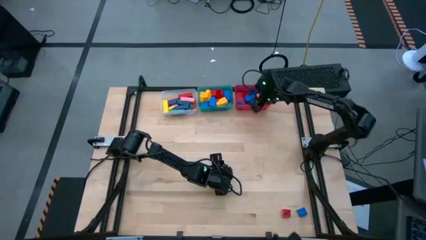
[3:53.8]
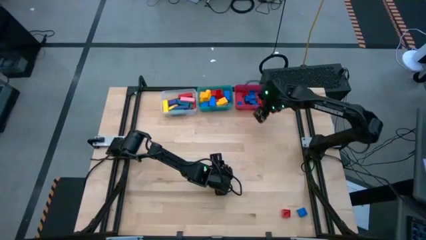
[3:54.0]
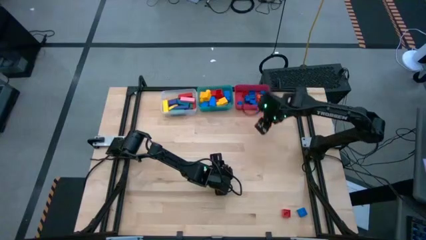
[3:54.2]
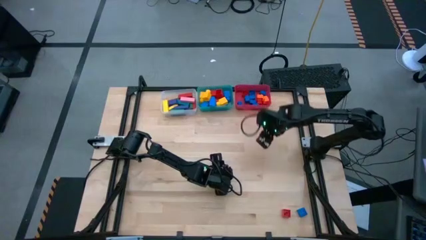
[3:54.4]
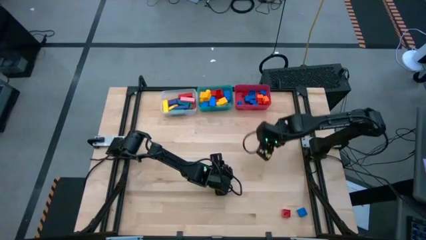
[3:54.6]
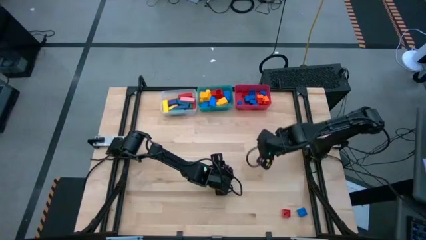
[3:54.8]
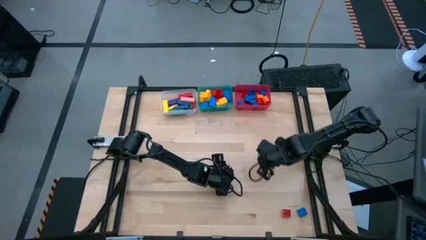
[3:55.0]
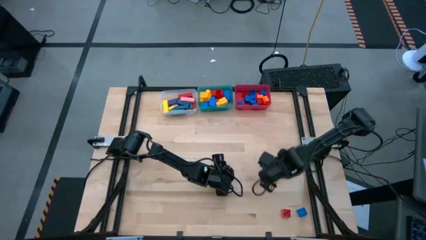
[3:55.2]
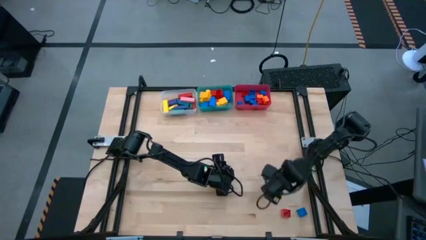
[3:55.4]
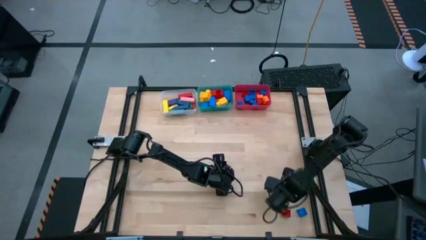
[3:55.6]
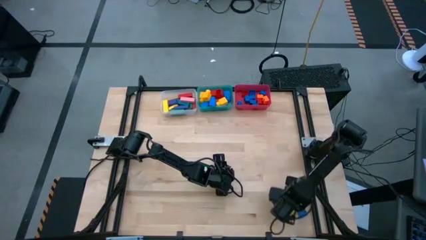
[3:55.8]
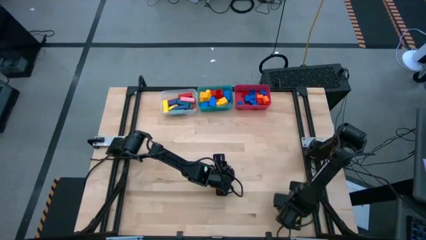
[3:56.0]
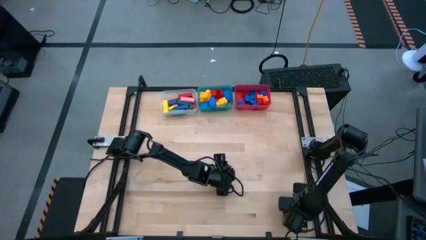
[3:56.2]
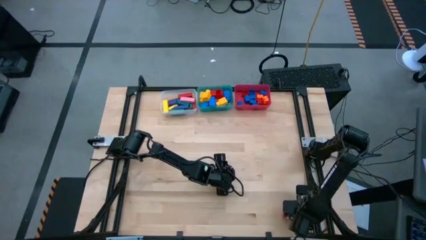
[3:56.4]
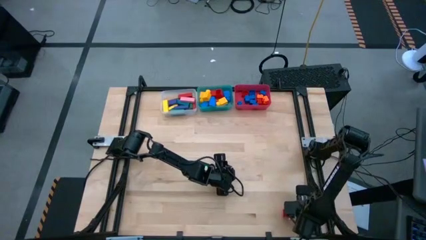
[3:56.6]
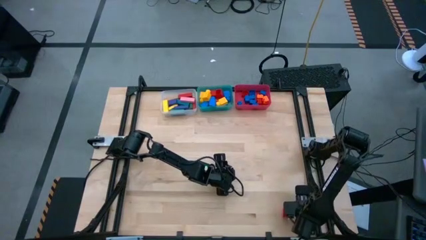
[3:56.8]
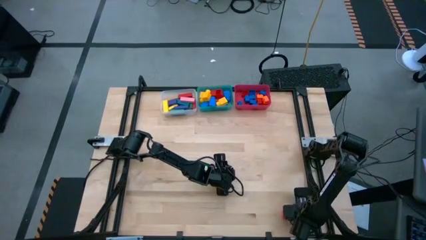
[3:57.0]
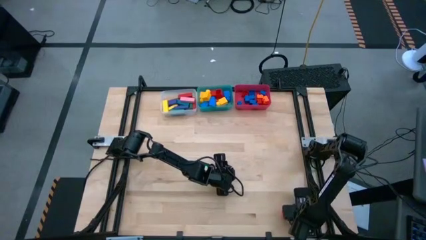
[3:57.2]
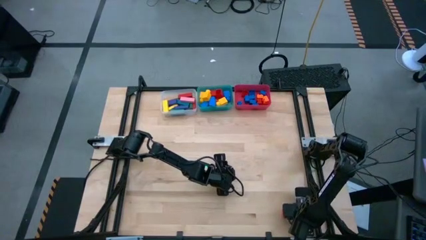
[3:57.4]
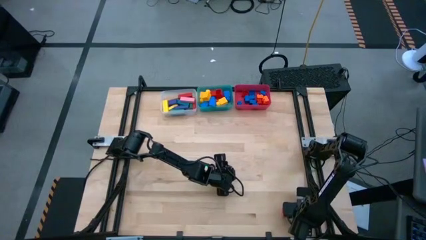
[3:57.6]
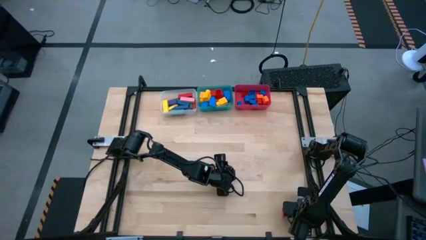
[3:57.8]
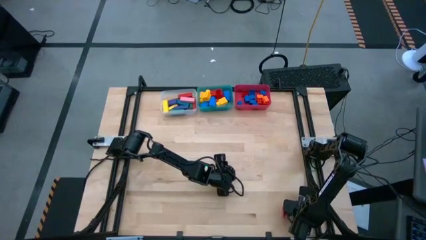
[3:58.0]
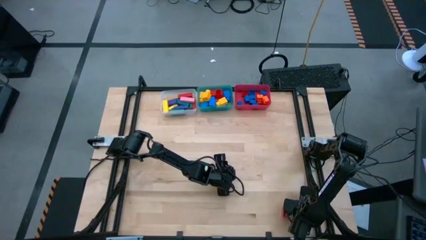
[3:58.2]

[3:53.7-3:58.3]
Task: Sort blocks by size
Put the small blue game piece into the red bin

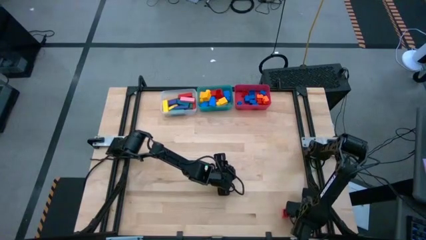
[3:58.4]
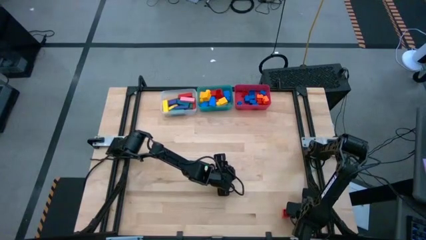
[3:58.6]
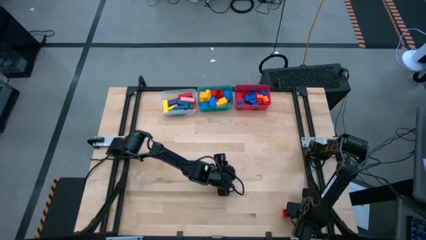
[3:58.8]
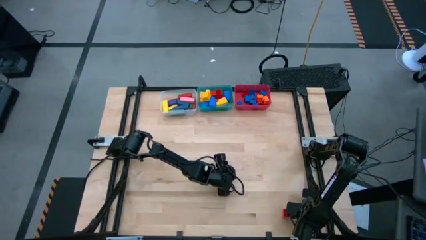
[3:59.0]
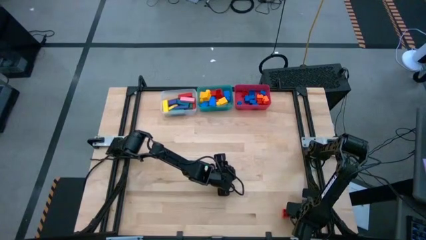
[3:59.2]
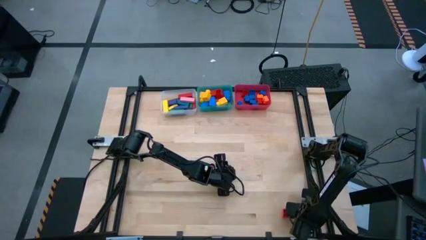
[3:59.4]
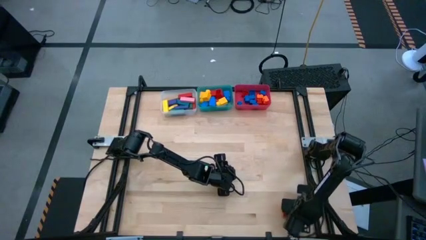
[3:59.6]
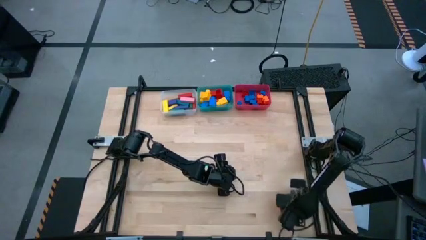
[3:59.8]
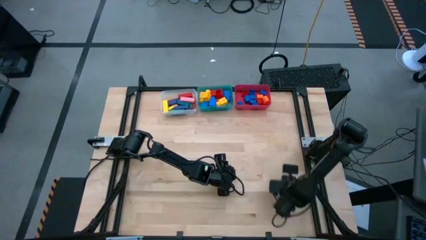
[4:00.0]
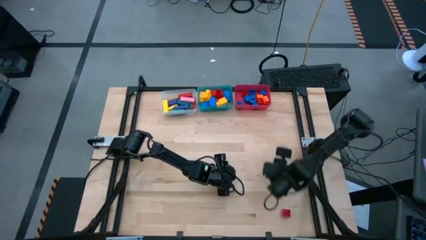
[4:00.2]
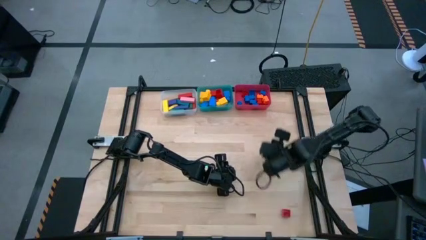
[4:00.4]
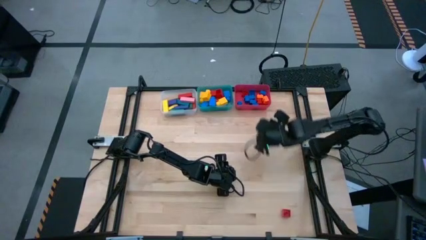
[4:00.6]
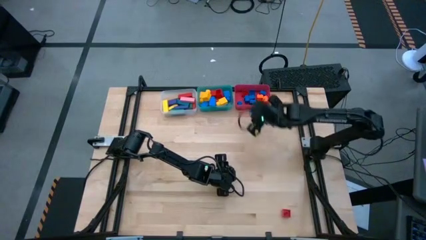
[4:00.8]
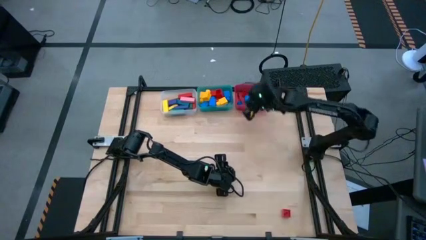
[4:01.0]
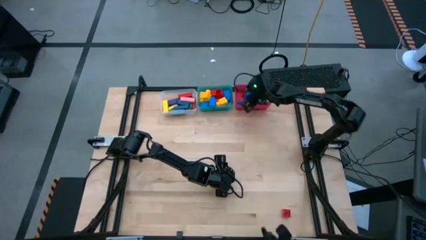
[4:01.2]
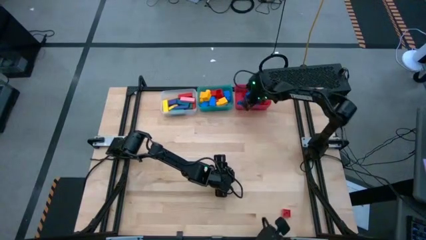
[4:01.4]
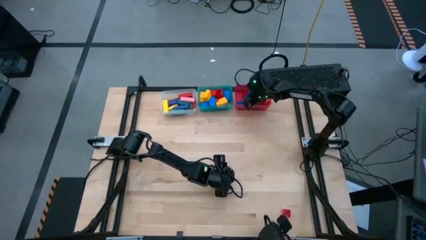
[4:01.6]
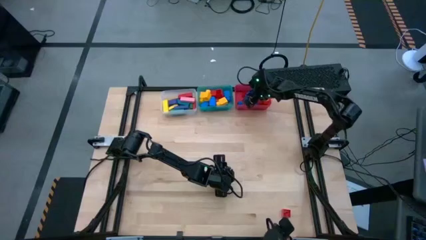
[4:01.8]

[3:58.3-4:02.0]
Put the blue 4 stud game piece into the red bin

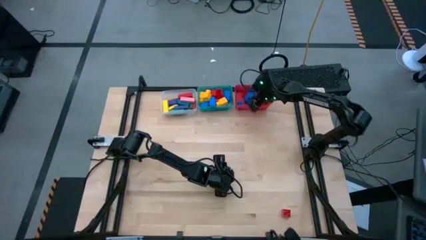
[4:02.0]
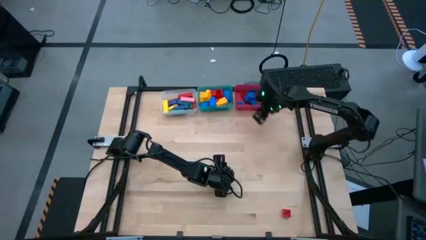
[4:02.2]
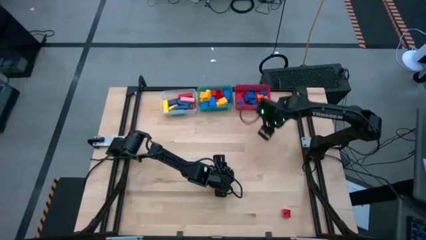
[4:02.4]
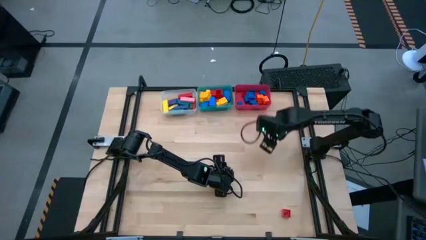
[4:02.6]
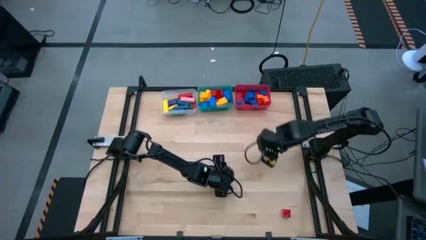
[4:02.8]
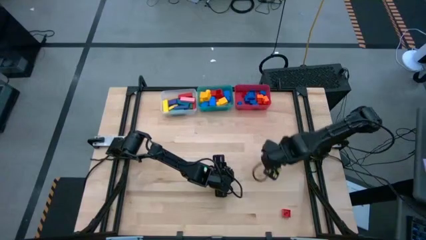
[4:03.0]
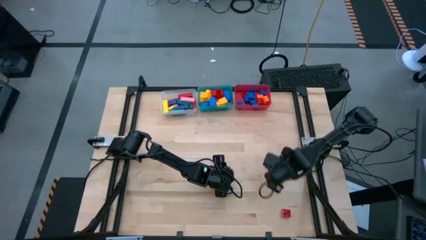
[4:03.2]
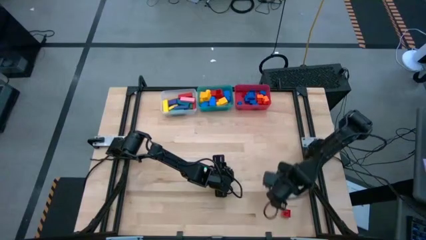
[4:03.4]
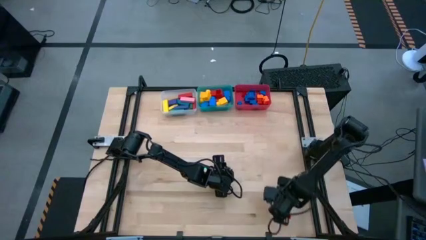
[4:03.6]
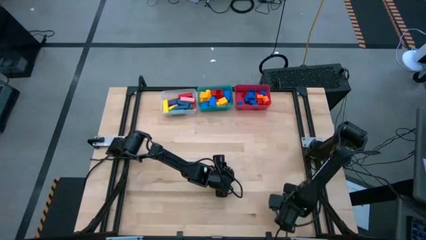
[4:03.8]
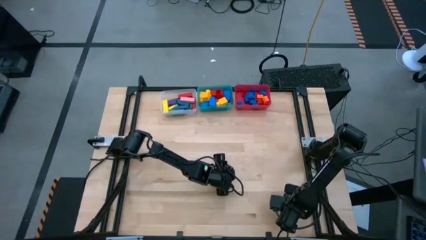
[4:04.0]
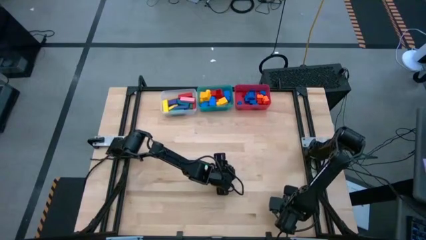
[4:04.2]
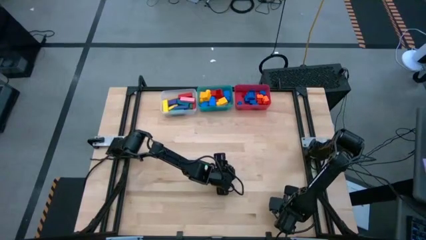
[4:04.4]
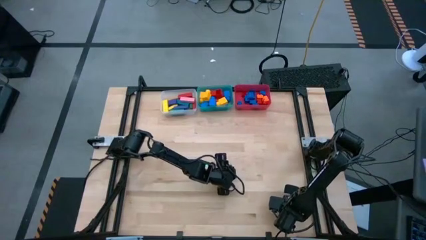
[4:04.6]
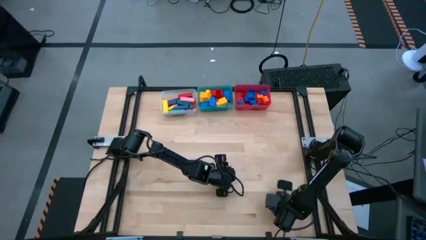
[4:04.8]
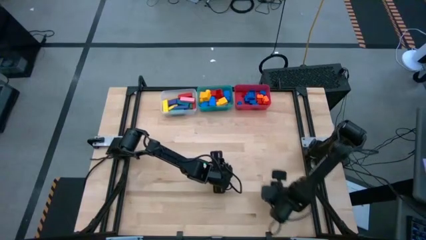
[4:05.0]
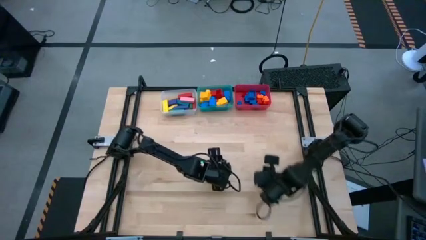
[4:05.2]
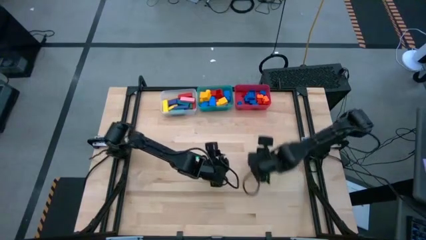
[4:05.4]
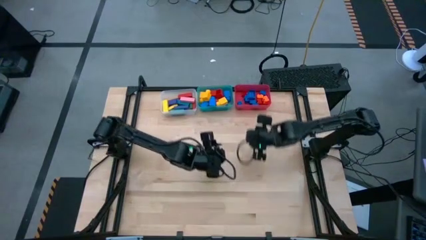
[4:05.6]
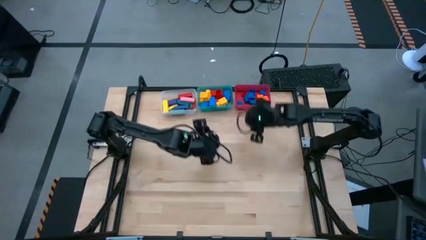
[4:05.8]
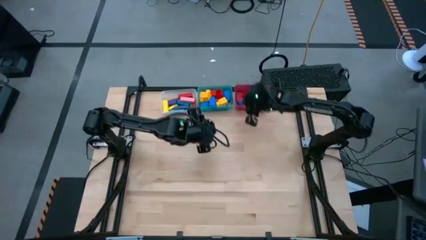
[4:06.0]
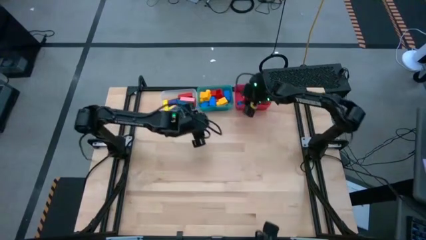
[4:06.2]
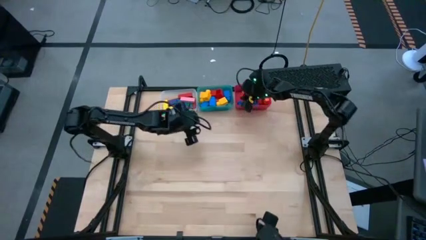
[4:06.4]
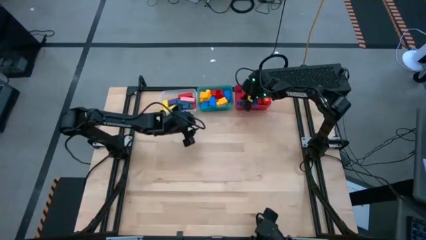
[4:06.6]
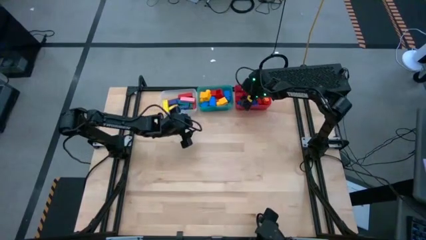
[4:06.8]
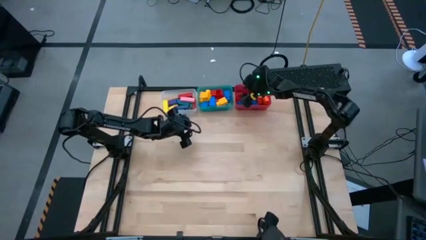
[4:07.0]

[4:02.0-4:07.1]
Put the red 4 stud game piece into the red bin
